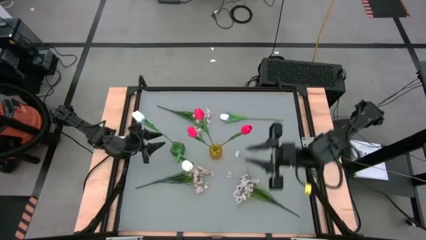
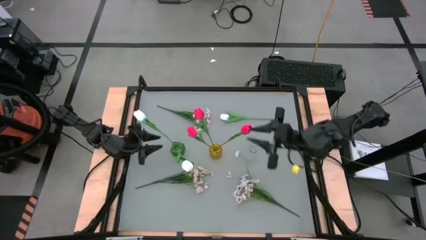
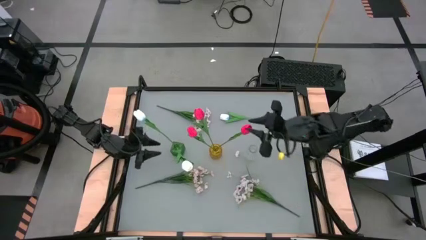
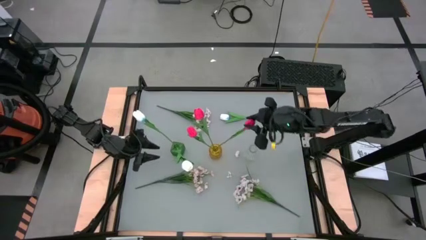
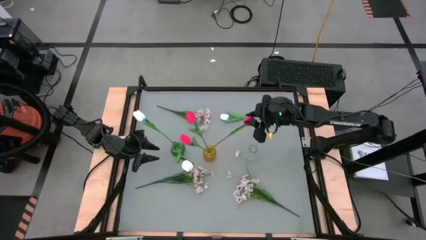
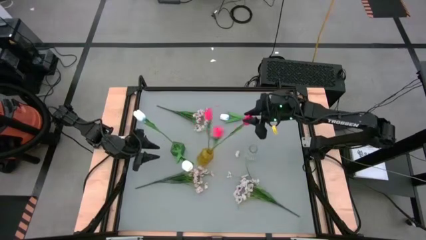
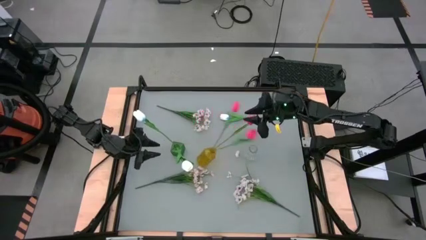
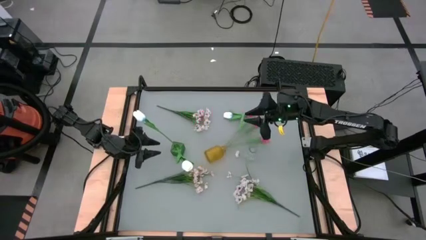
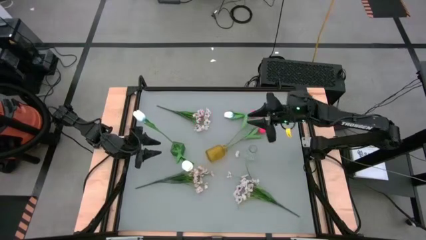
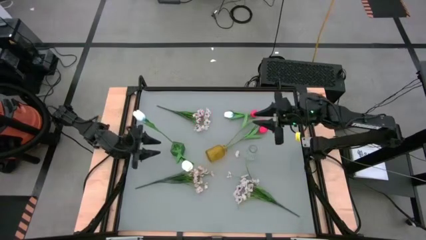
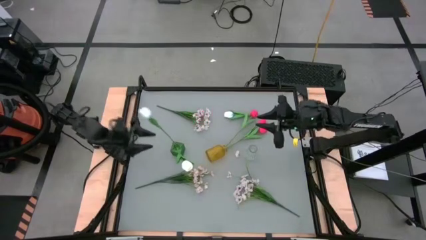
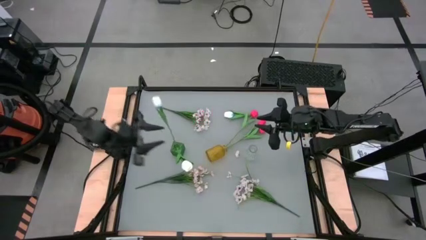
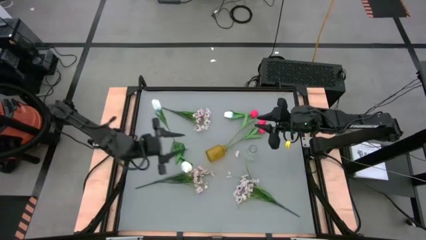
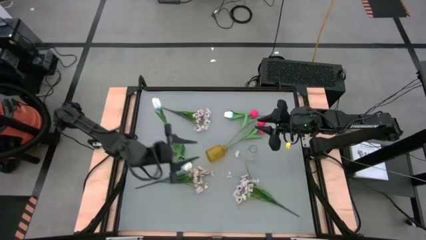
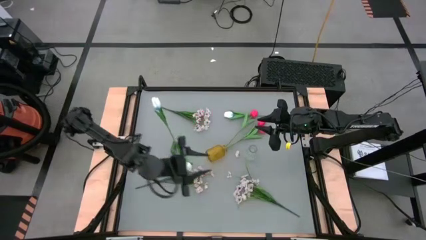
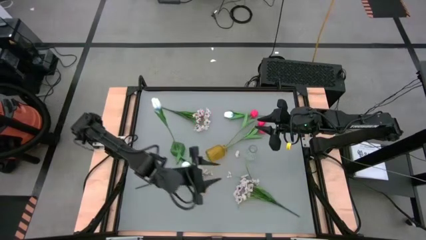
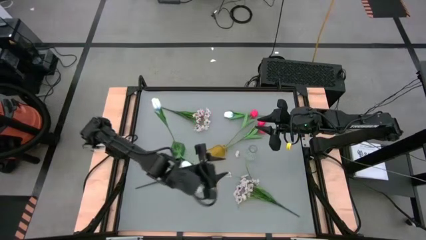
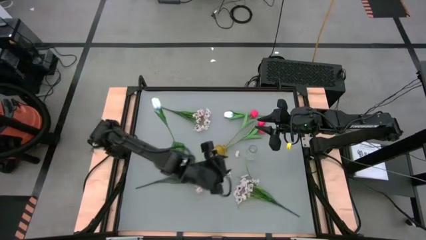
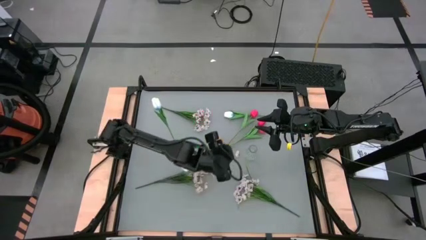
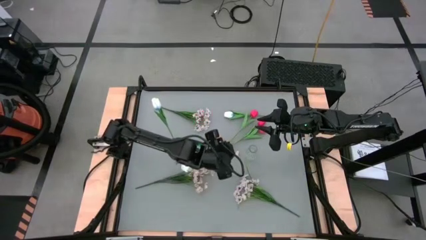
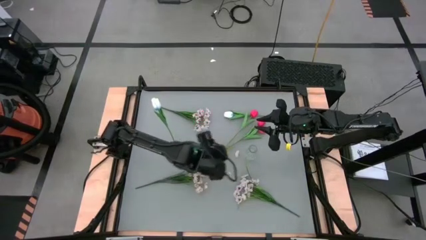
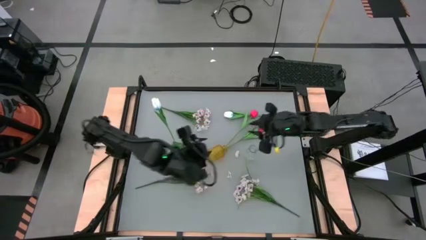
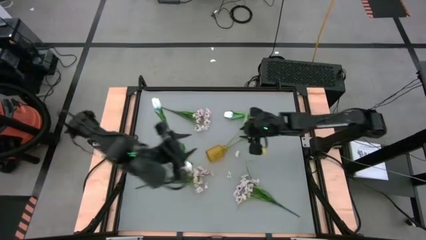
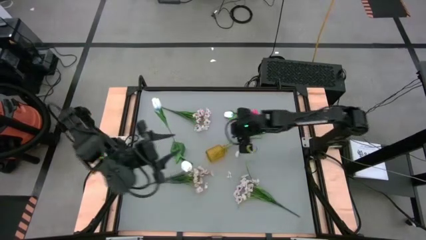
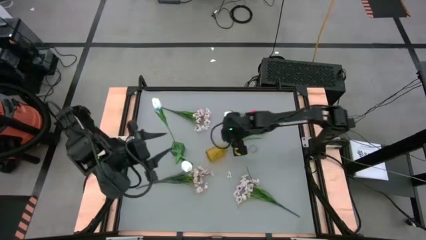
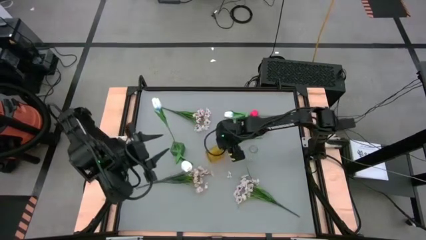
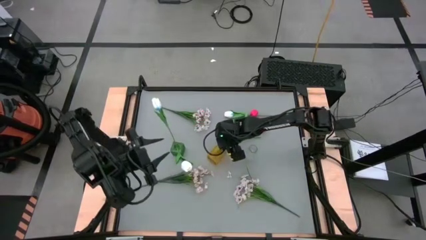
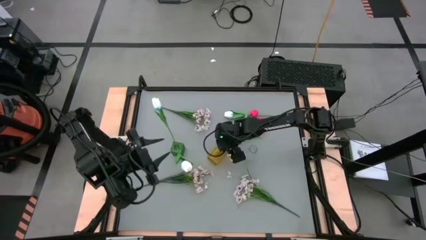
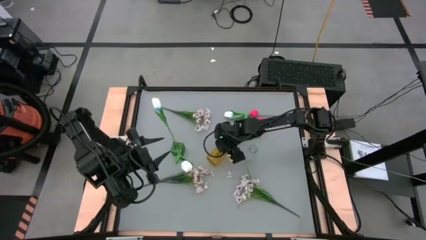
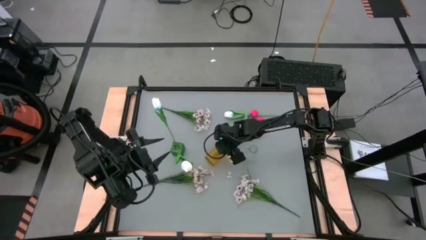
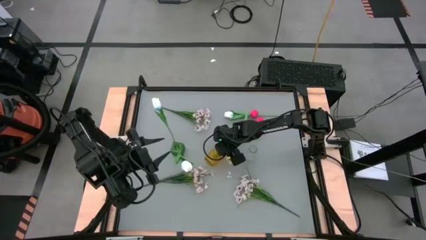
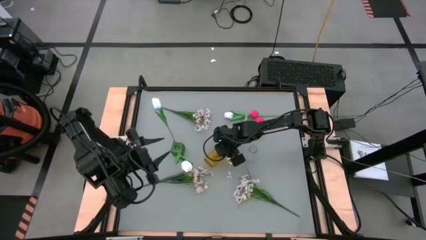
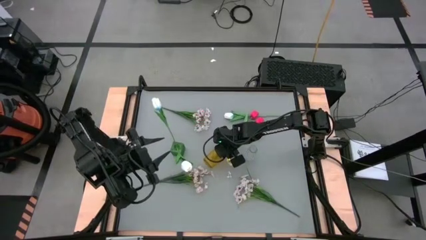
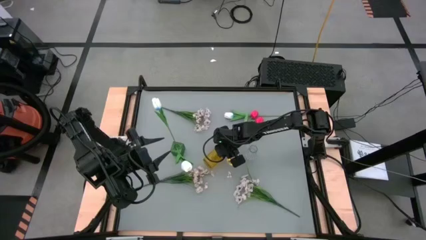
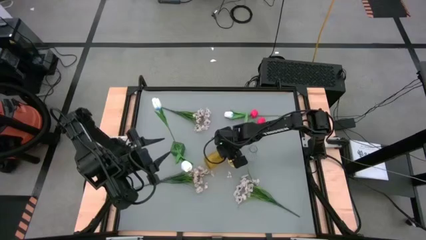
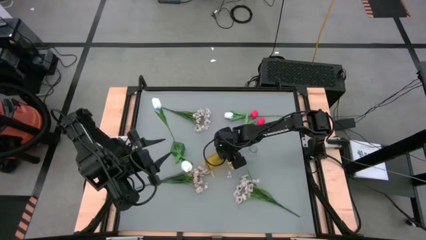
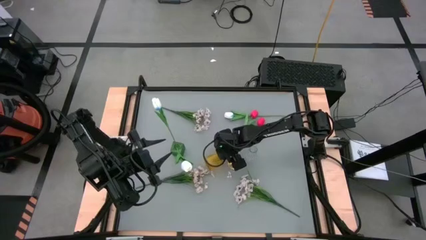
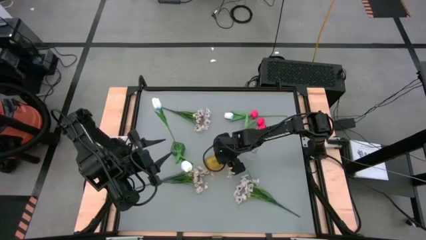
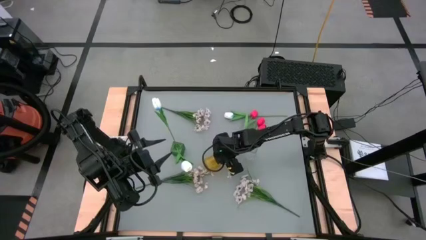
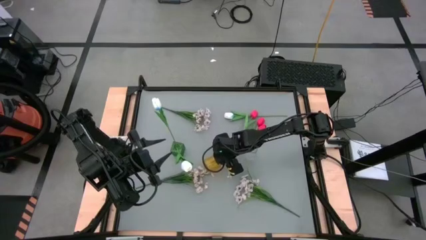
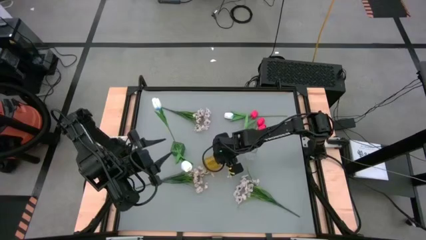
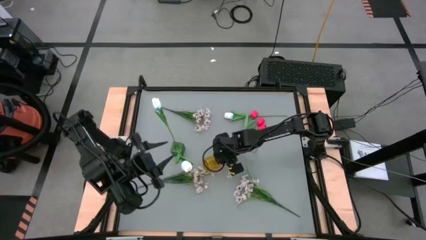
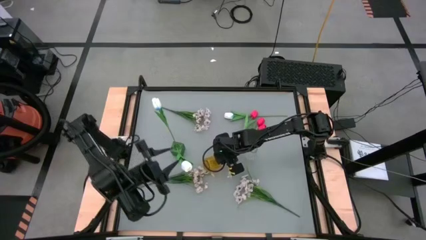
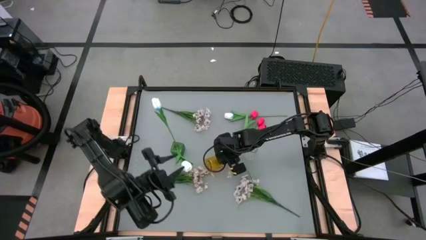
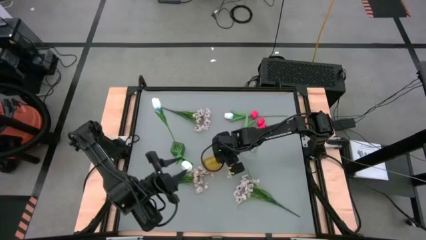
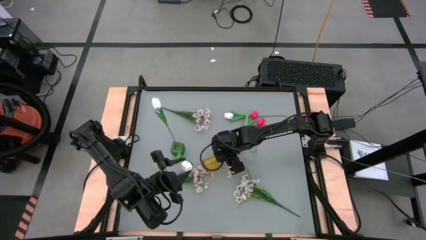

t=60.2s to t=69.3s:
Task: Sort flowers into vase by color
Adjust the yellow flower vase

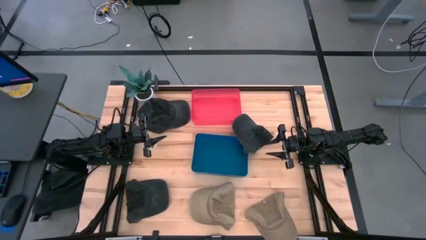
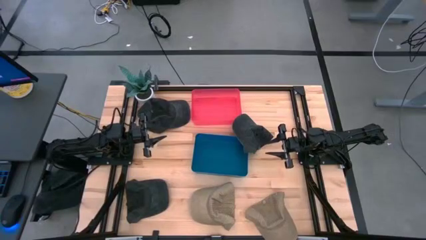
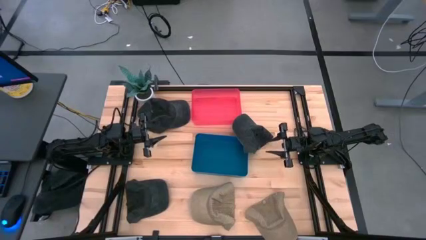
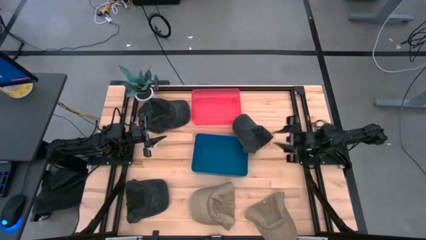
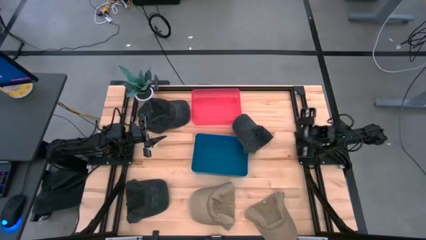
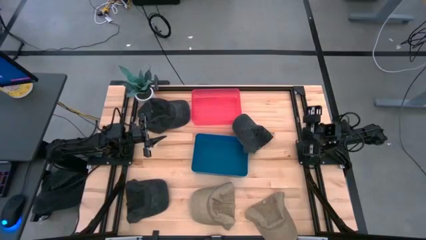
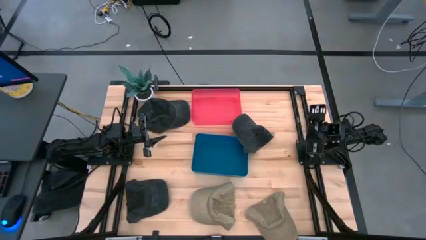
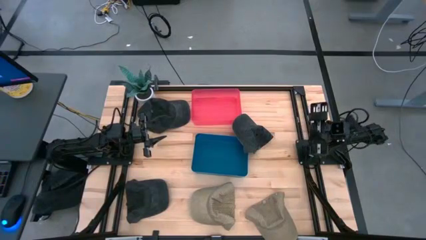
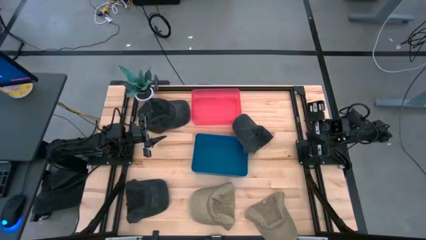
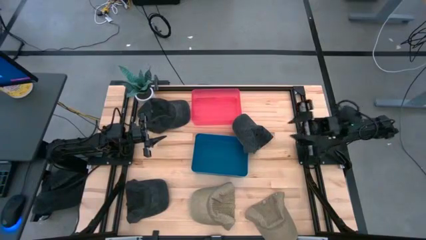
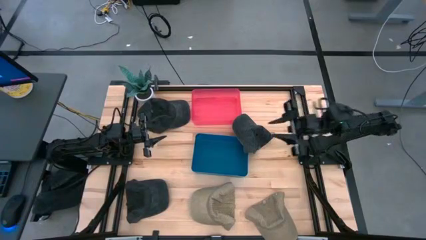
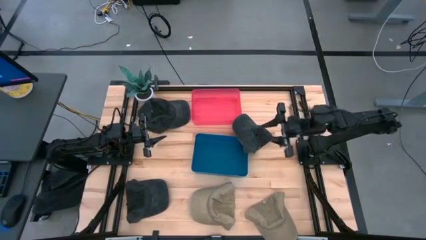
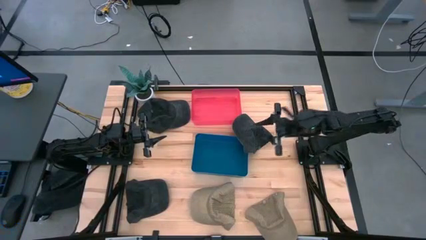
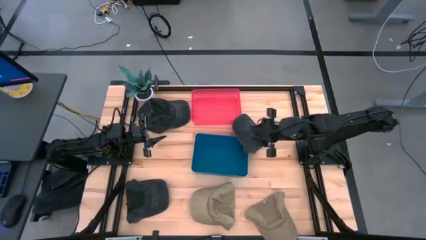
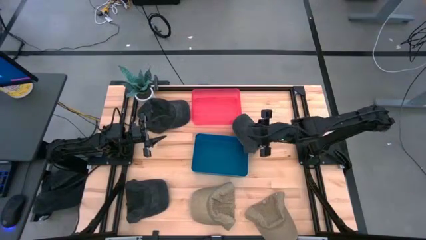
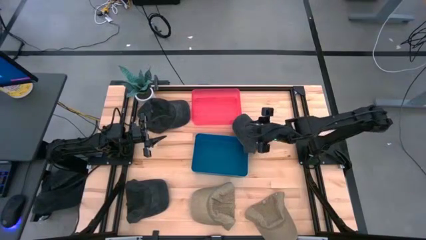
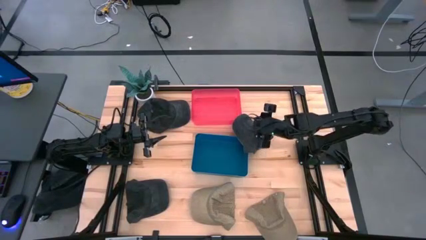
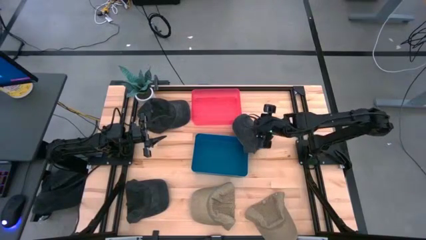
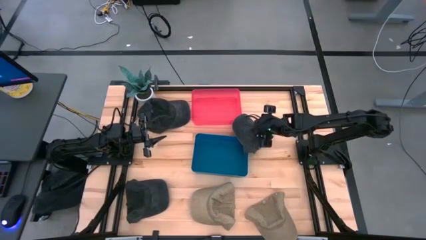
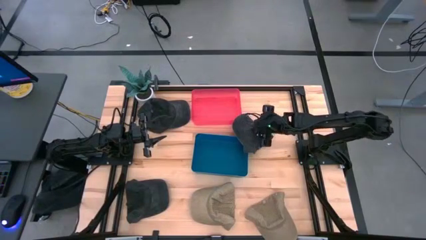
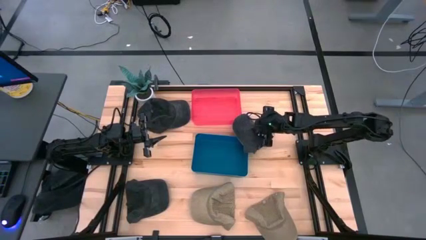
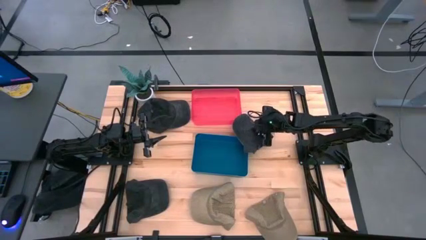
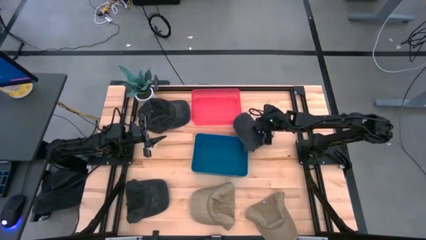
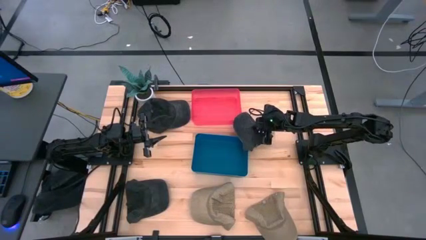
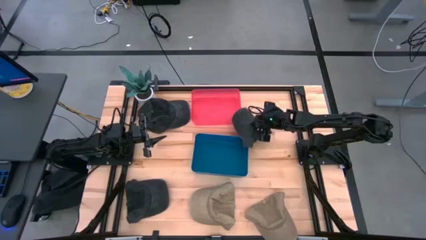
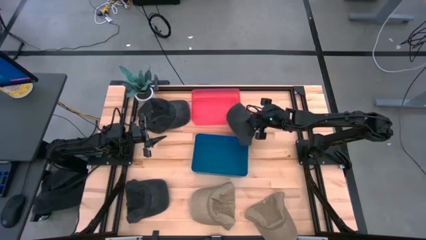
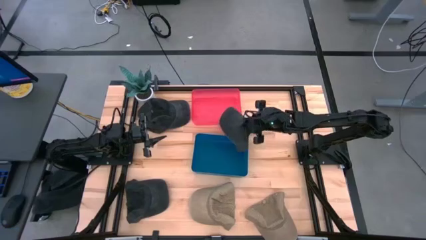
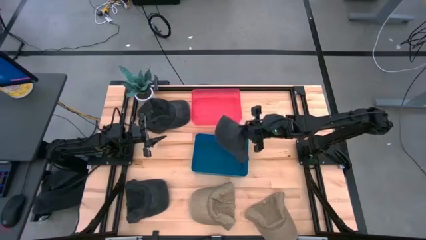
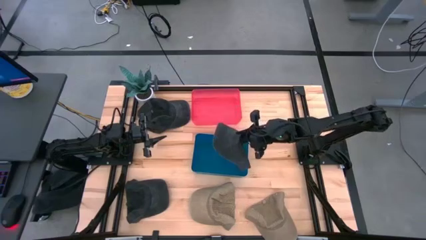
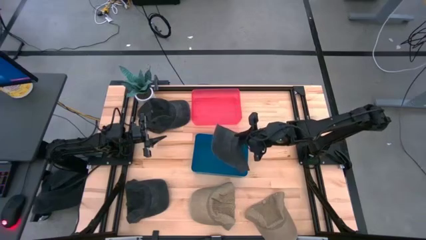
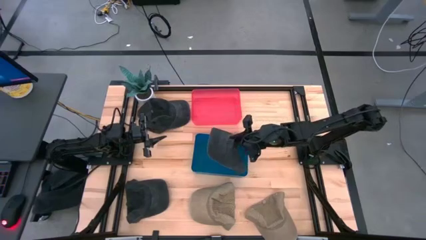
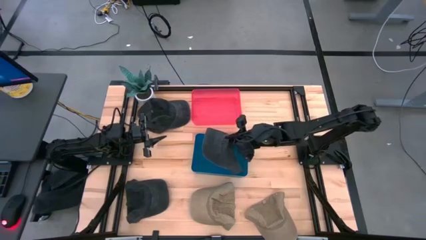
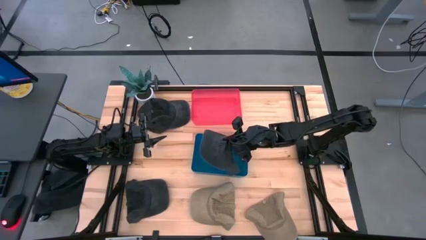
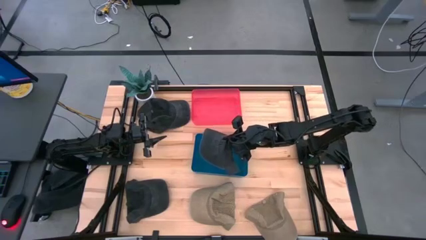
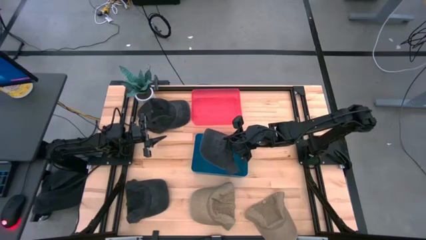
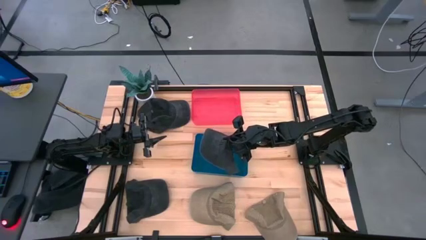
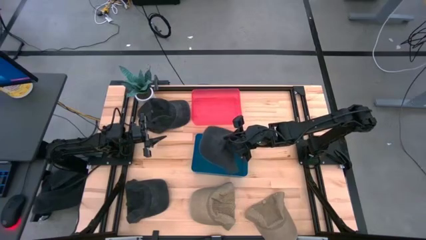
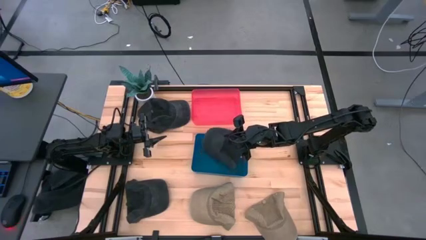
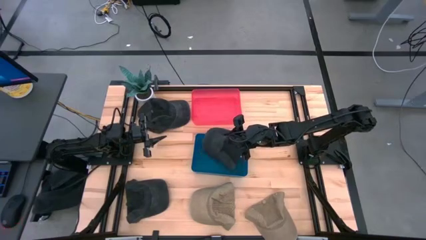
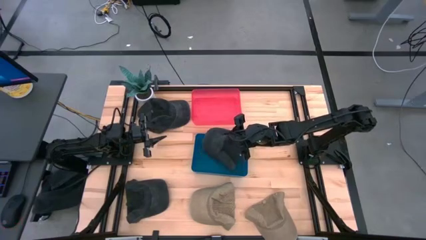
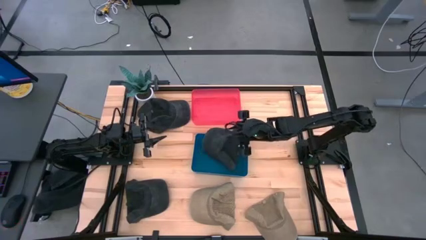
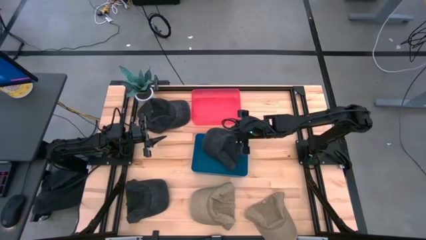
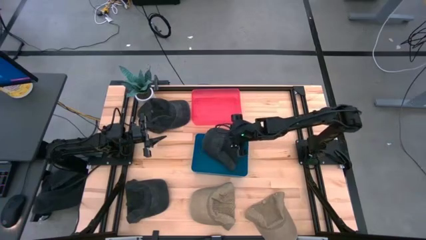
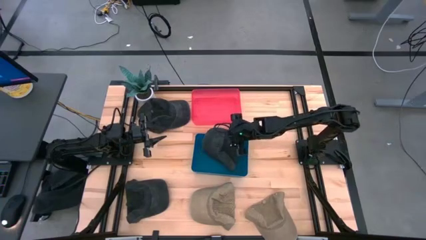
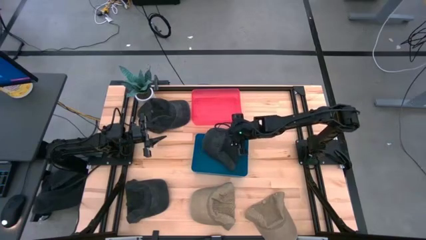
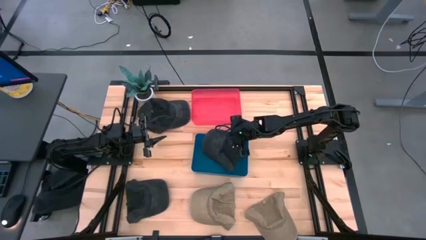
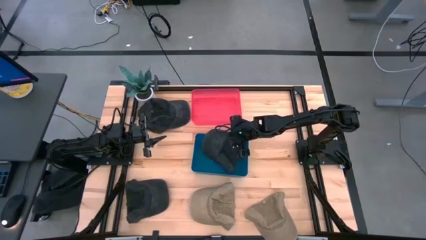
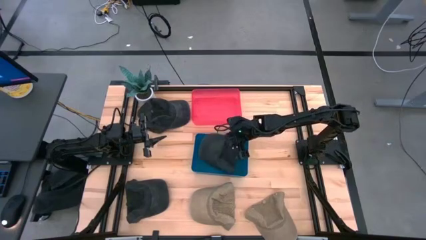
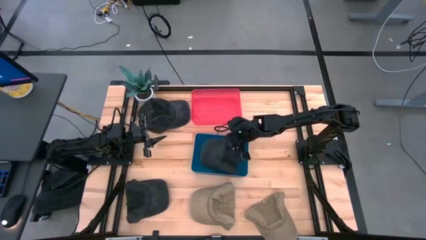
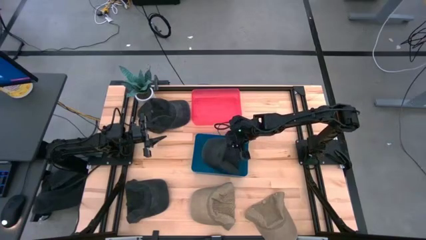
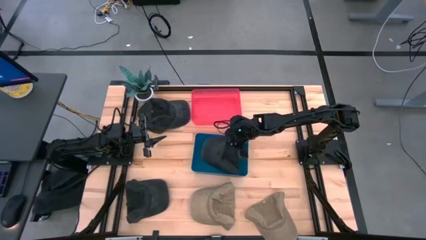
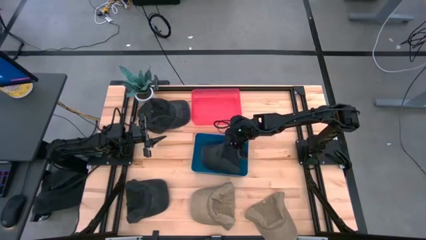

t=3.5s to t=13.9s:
Task: Pick & Place hat
Put the top right black cap into the blue bin
